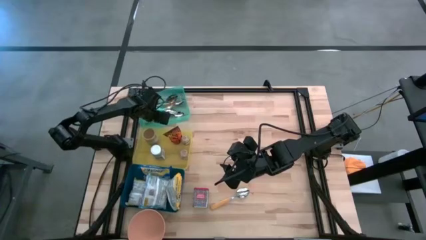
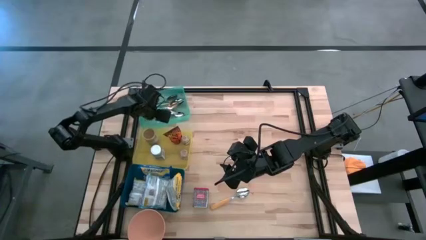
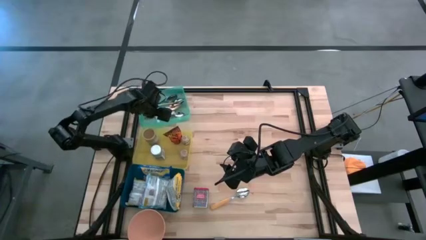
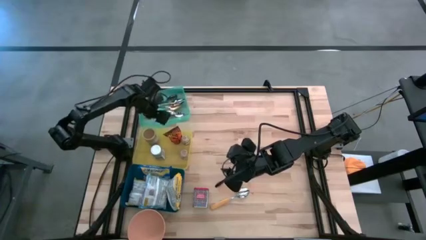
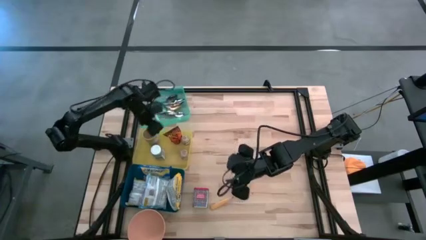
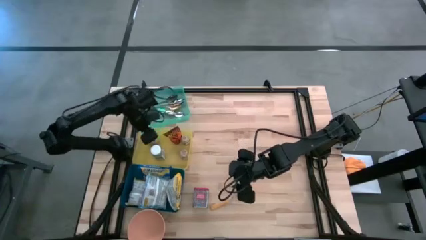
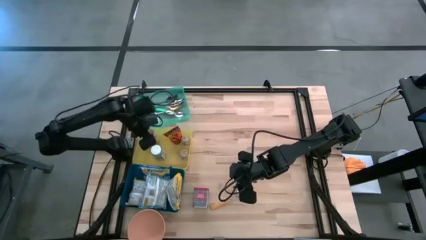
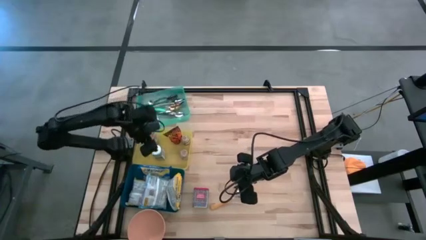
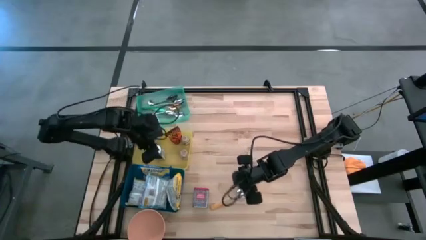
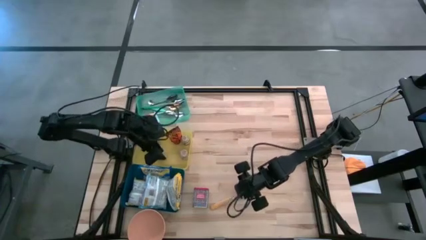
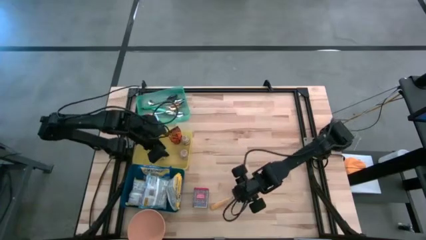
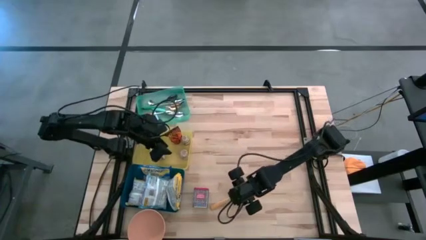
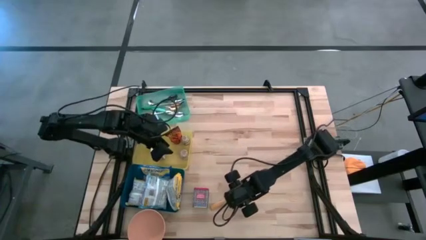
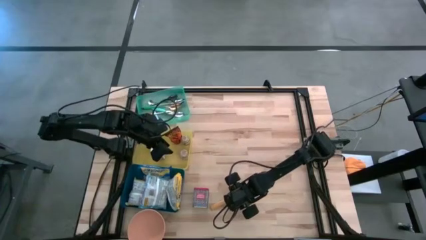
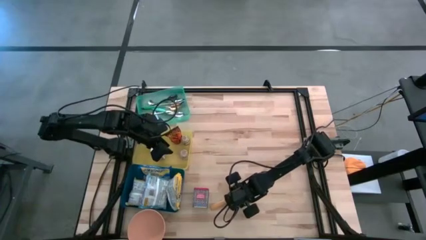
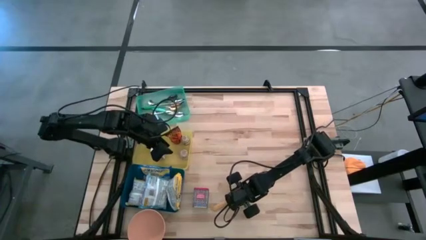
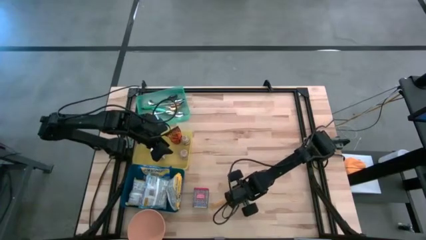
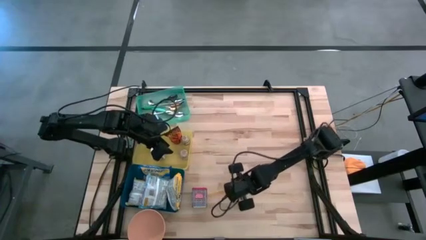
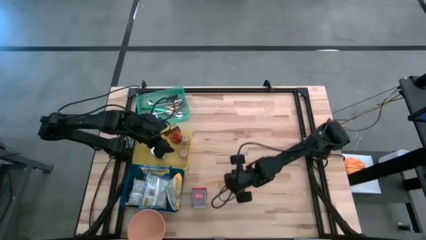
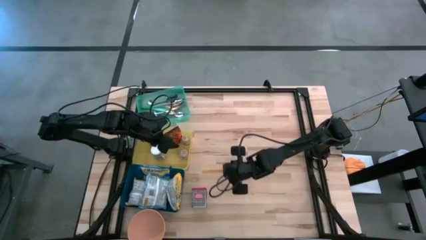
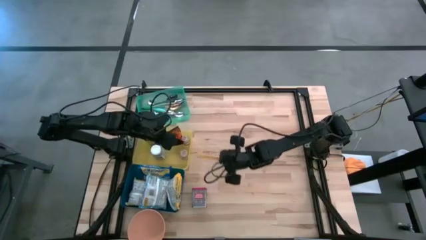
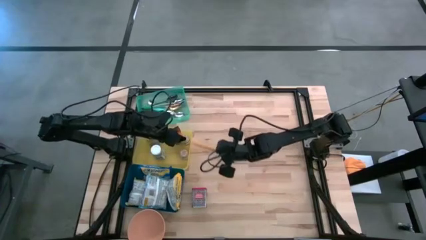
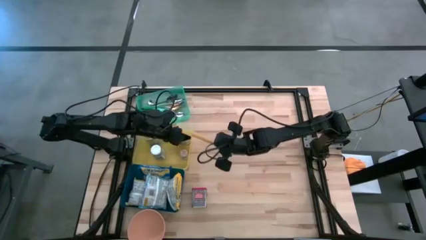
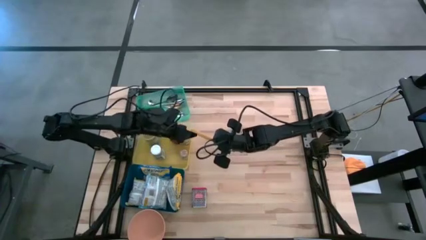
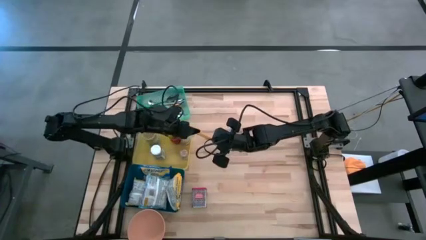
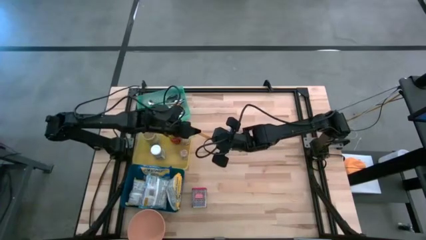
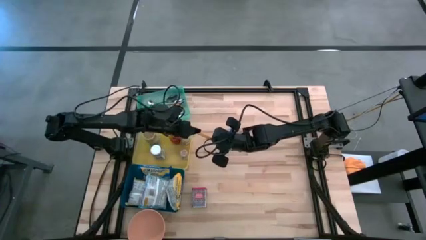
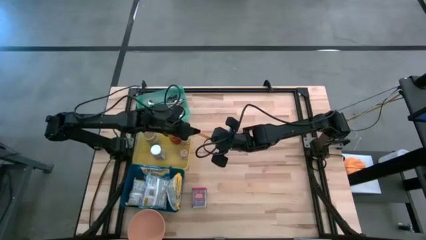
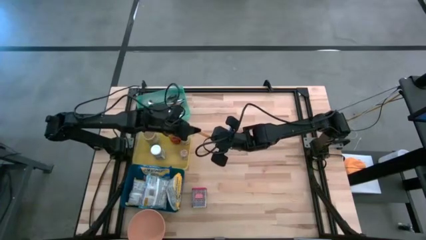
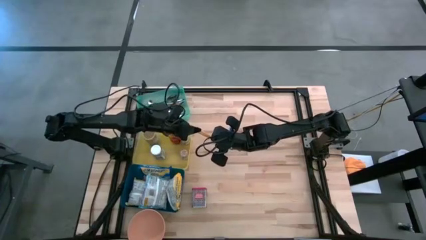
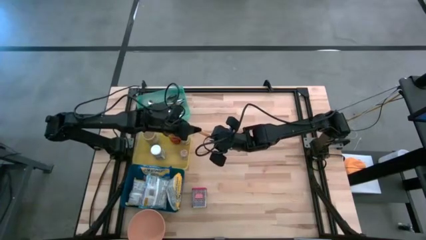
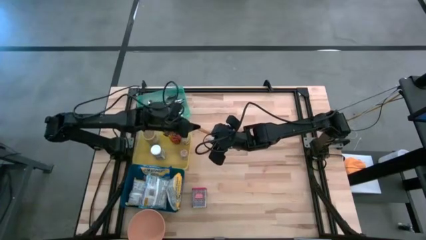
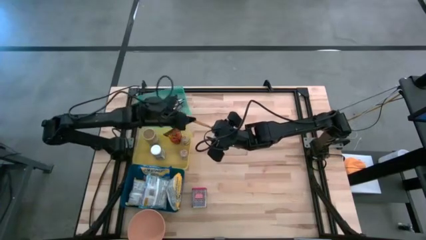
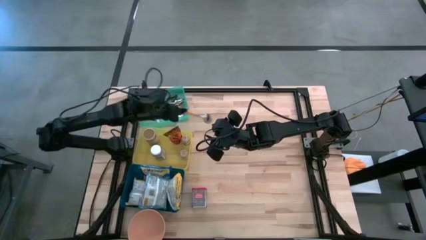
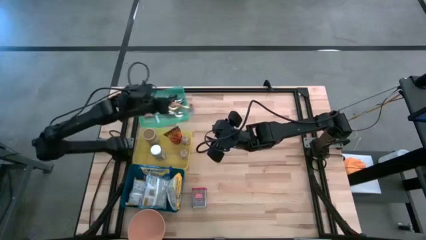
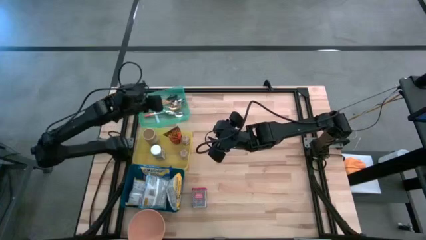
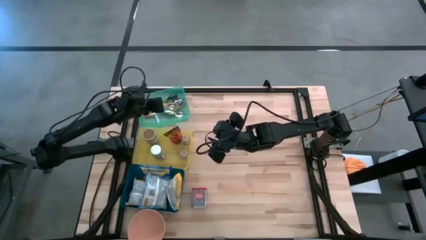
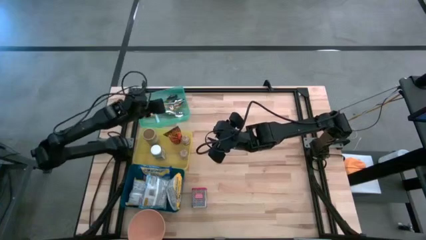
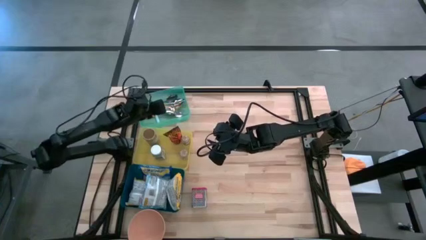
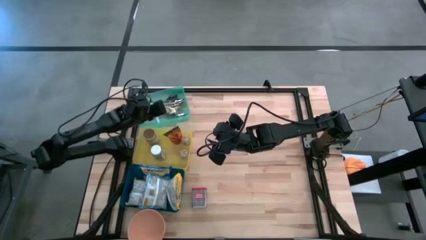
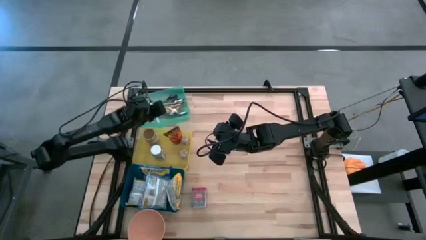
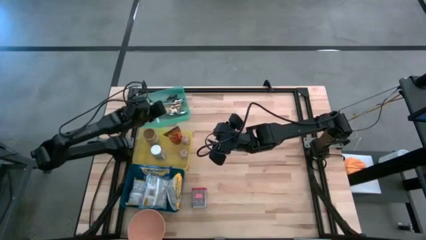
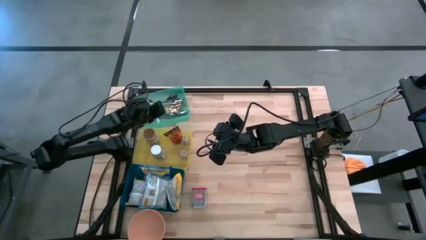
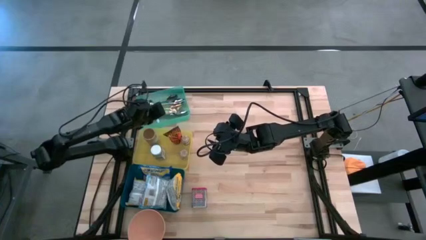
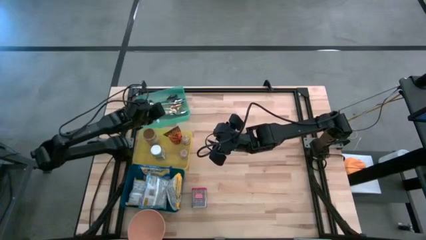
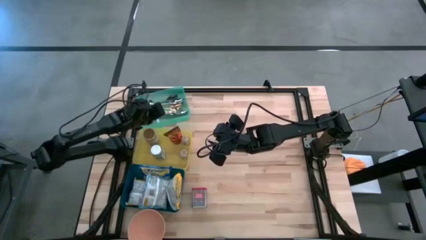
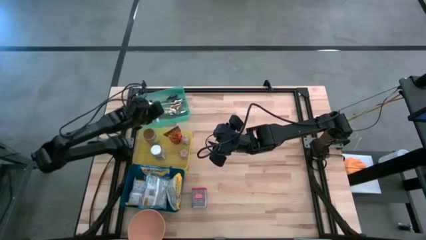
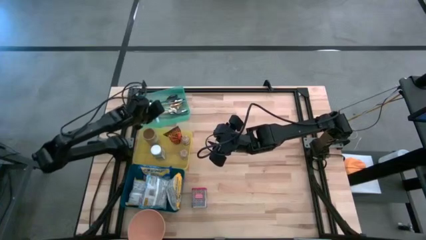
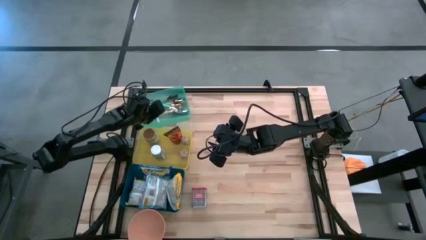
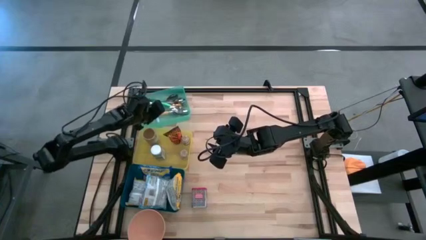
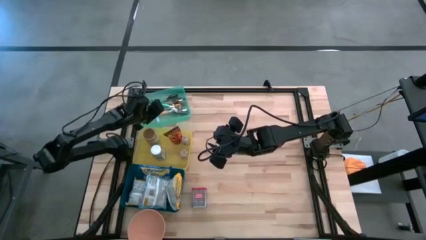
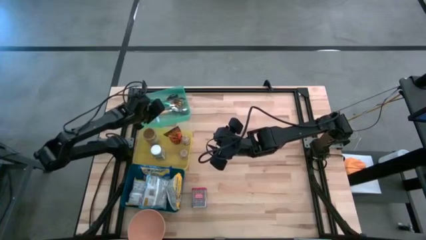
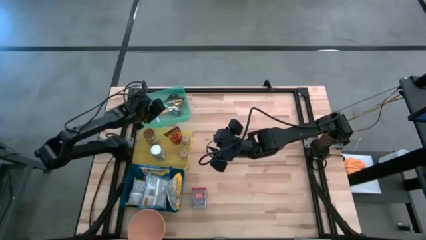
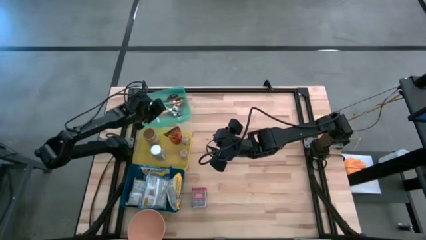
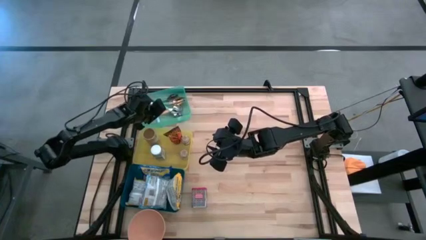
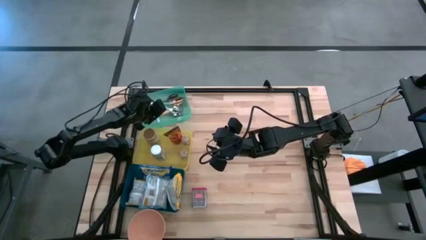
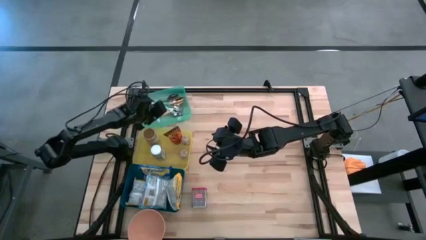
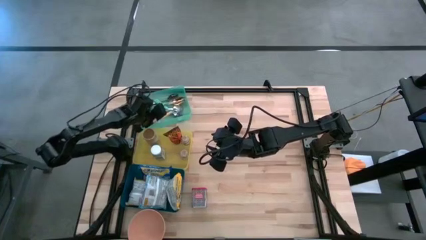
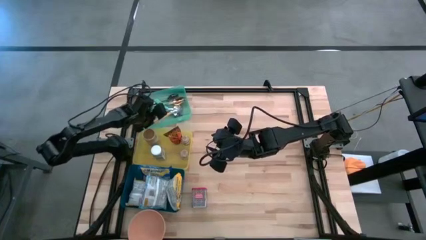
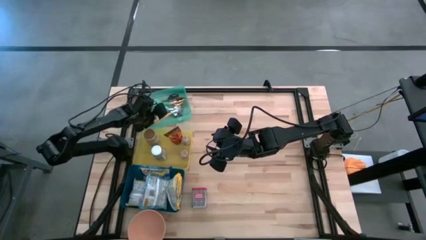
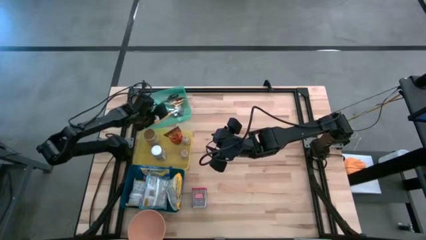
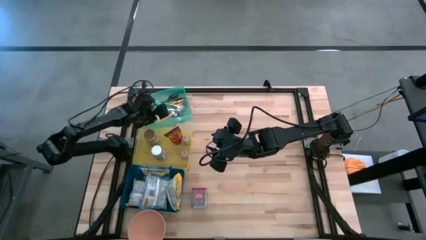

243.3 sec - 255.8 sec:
Put the yellow spoon into the green bin
